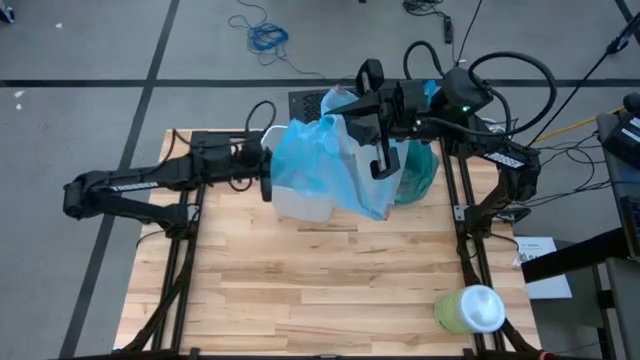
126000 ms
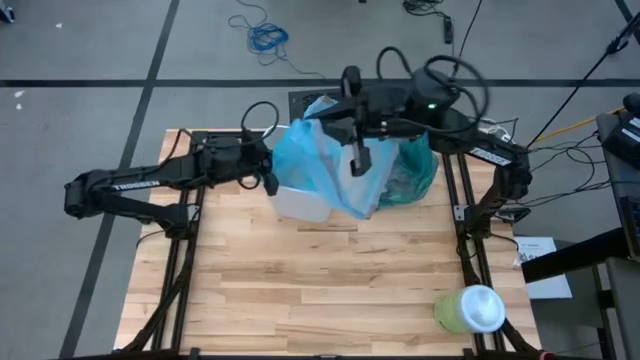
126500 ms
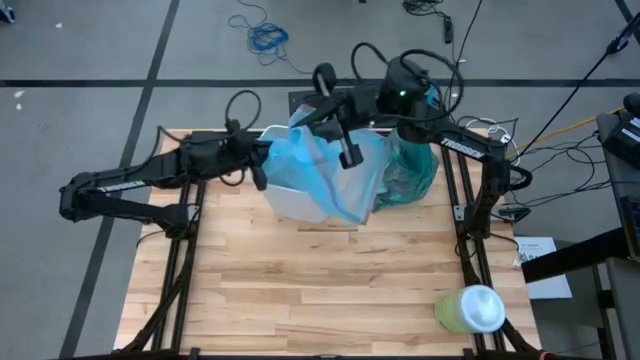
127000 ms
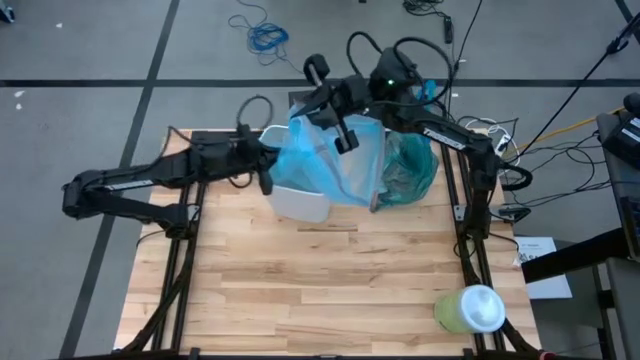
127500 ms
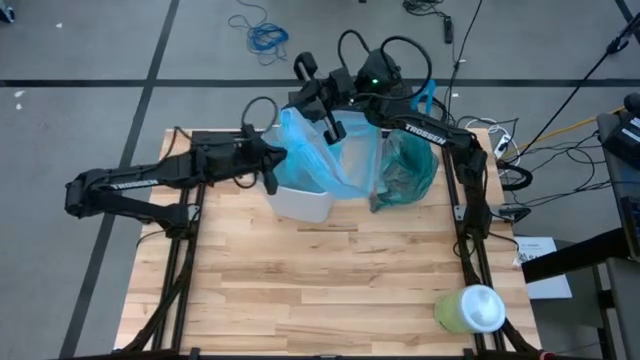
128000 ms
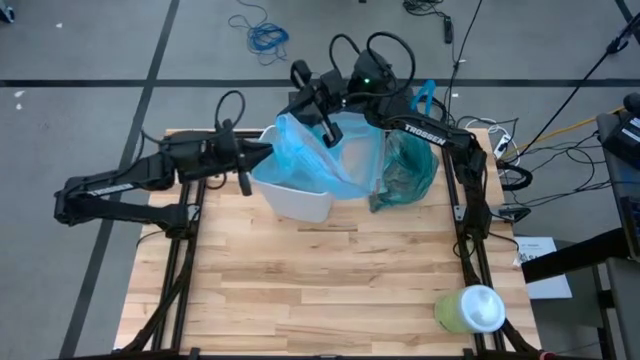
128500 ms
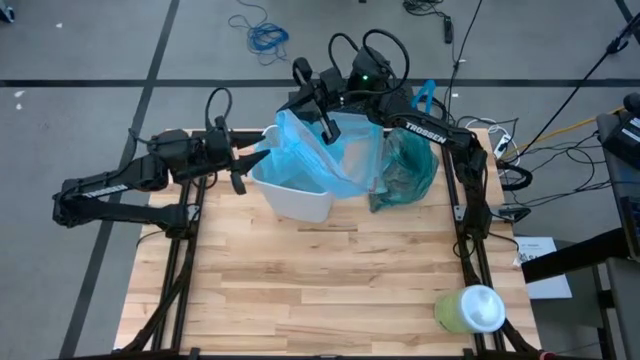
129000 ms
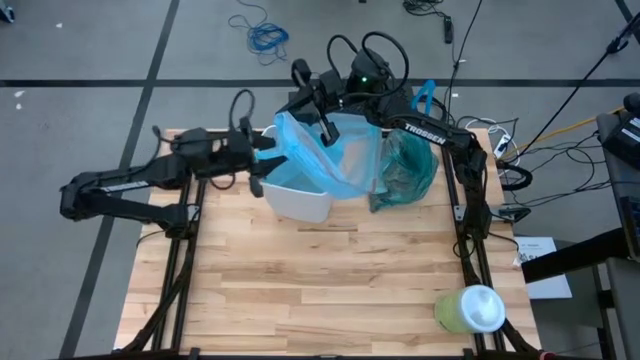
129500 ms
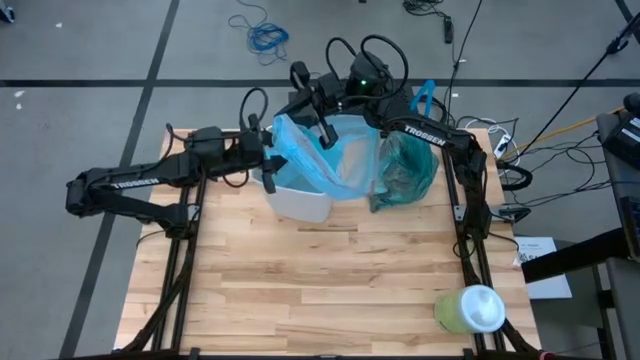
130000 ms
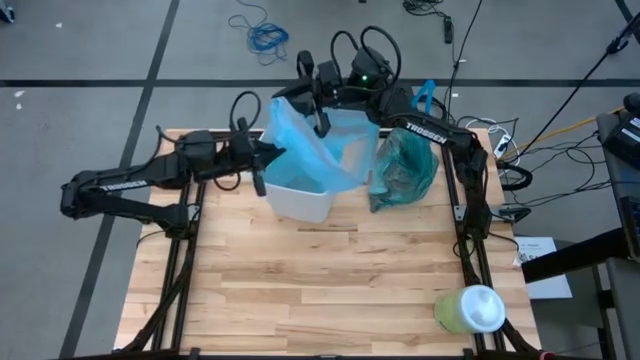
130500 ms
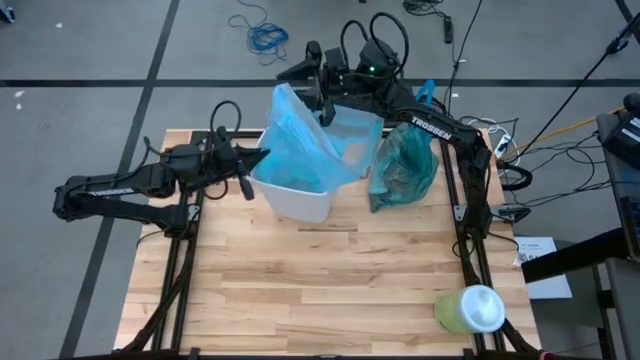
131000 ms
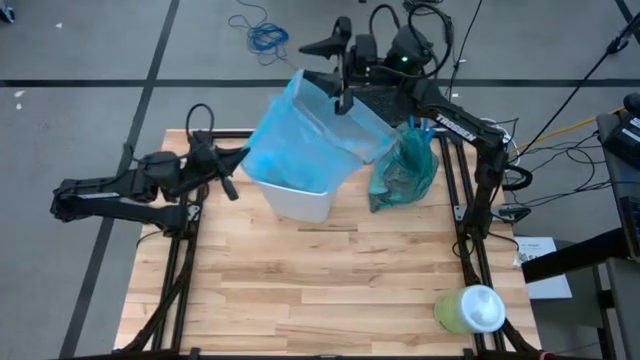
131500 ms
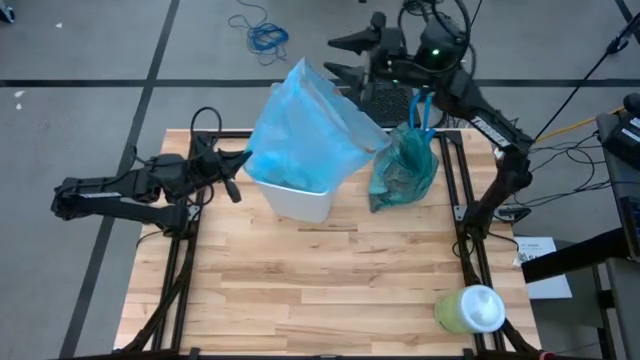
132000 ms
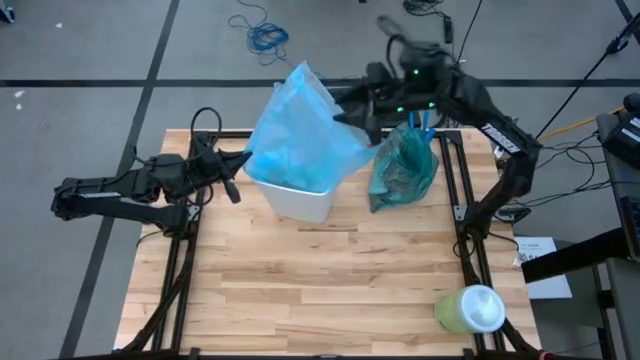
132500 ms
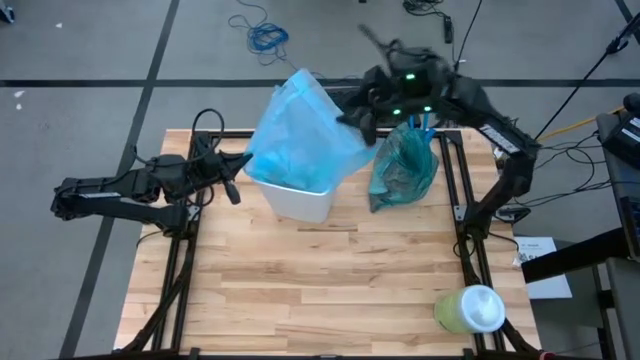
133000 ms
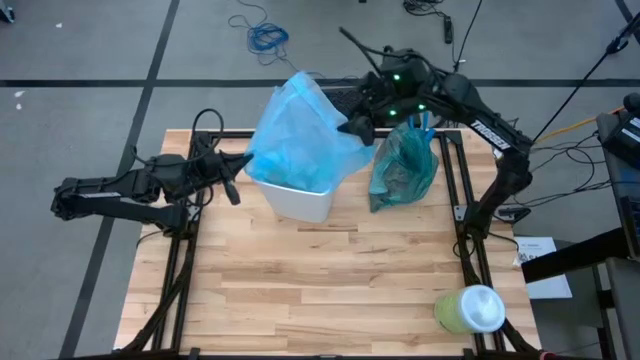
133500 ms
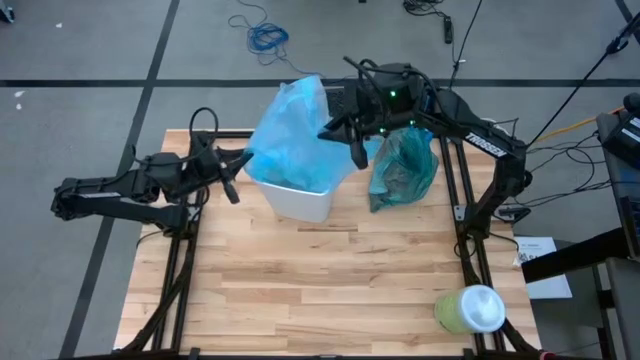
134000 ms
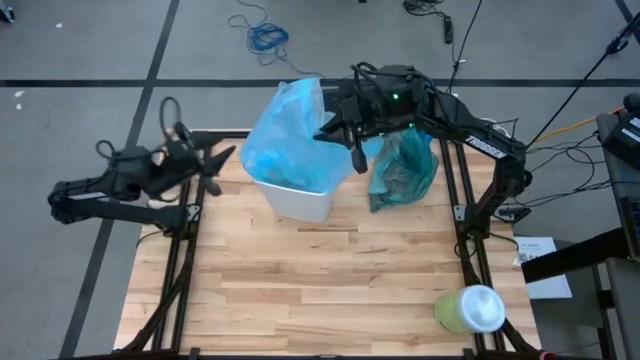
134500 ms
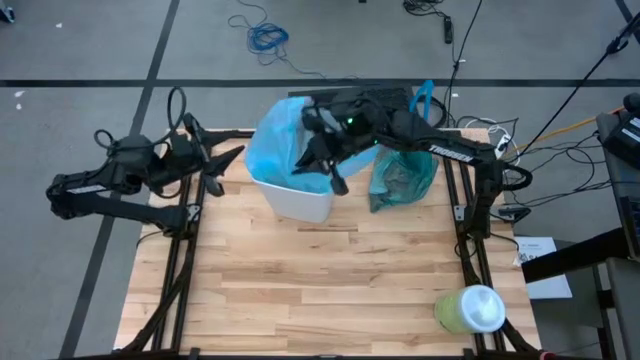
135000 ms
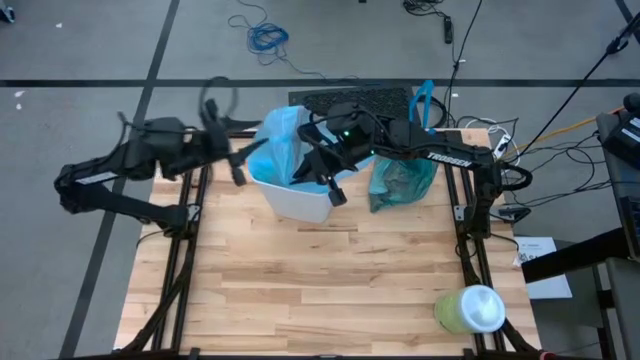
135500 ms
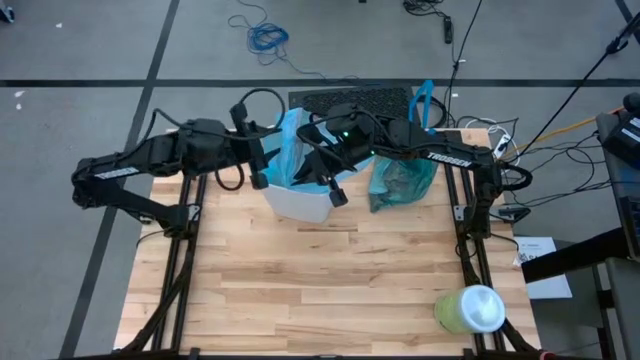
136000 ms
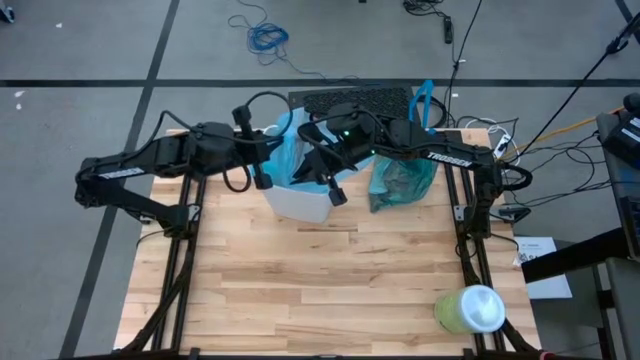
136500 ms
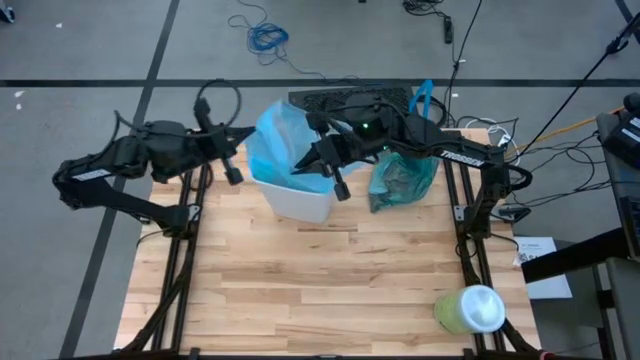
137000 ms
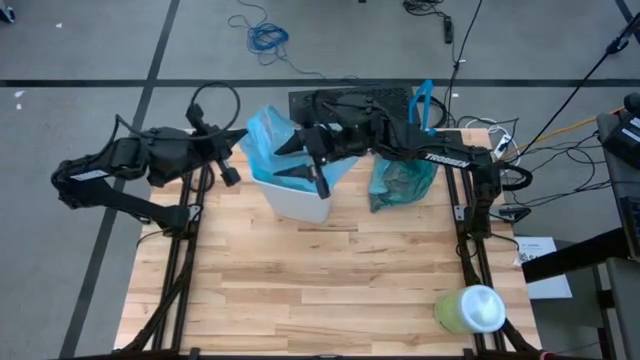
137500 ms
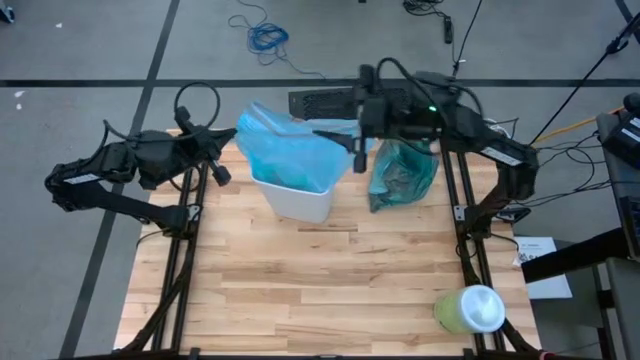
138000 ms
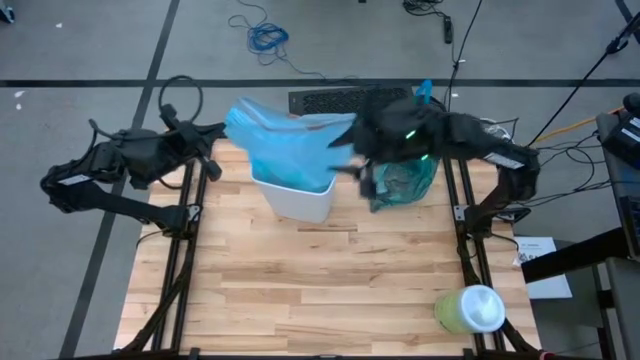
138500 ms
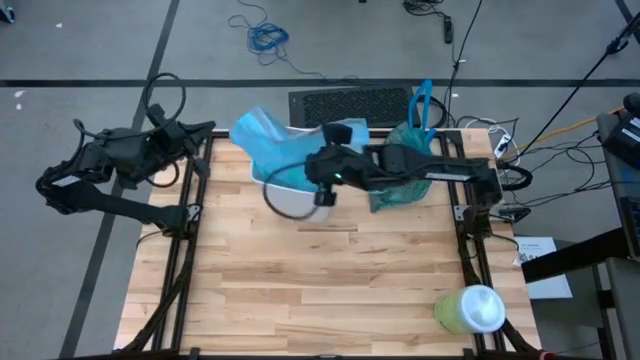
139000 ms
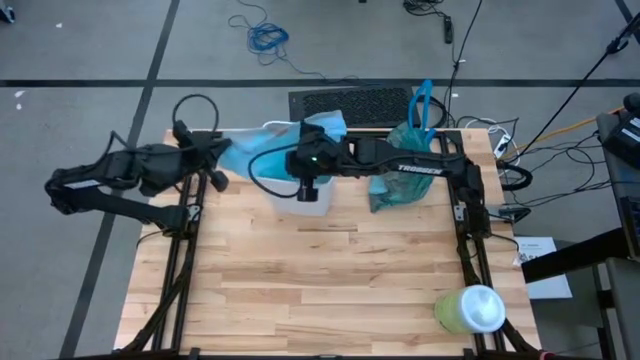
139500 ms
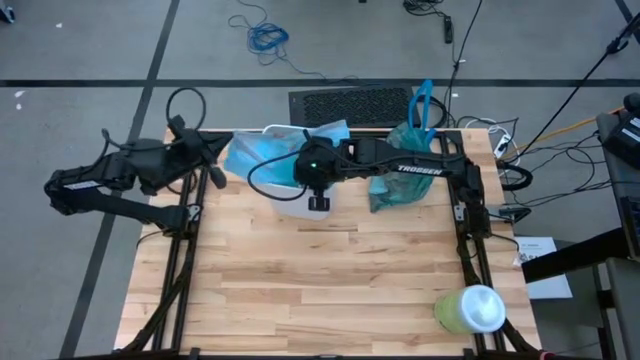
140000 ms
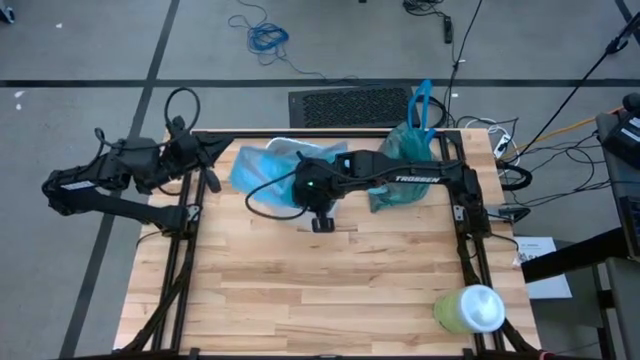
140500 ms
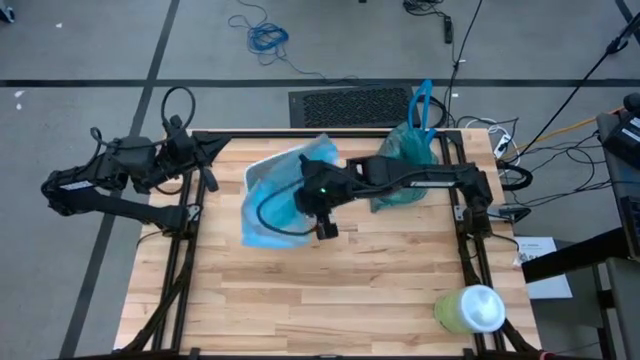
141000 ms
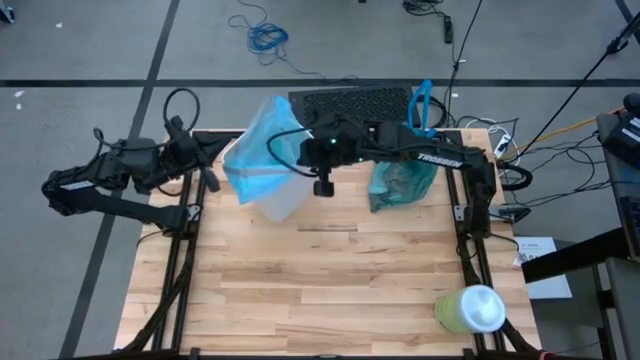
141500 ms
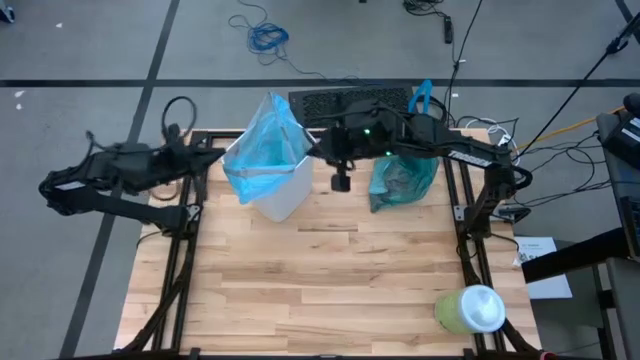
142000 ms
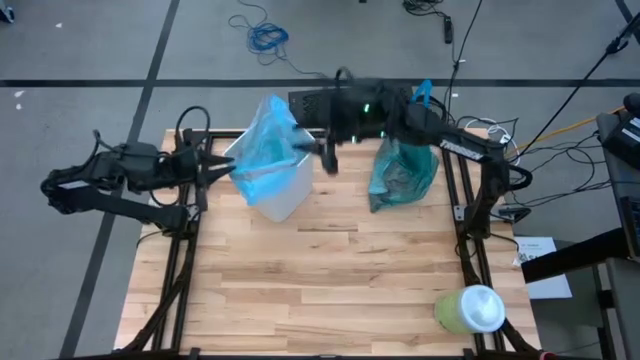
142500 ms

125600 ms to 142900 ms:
Task: place trash/remove bag and relplace
Insert a new trash bag into the trash bin

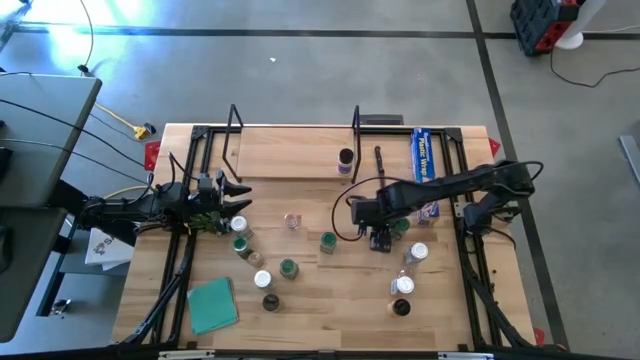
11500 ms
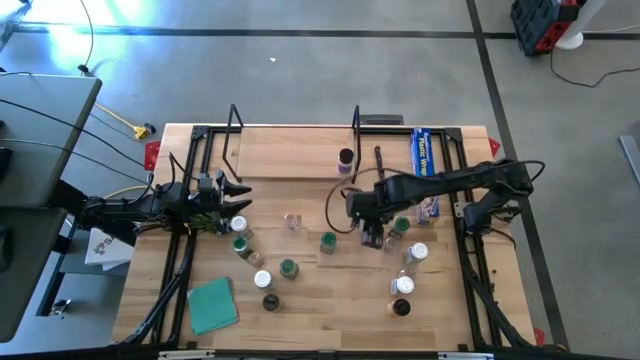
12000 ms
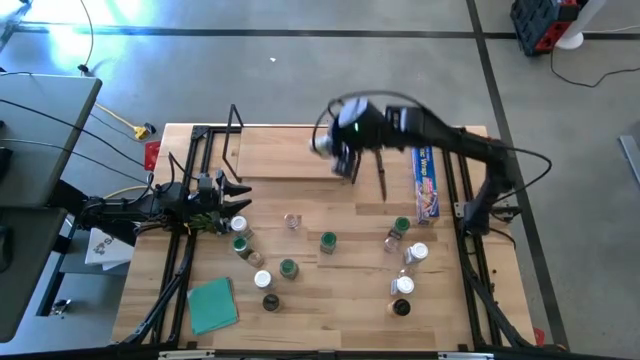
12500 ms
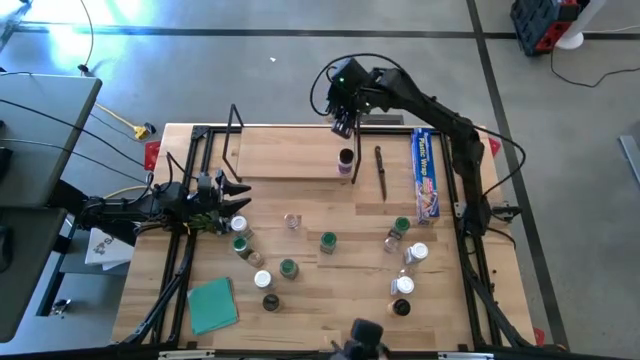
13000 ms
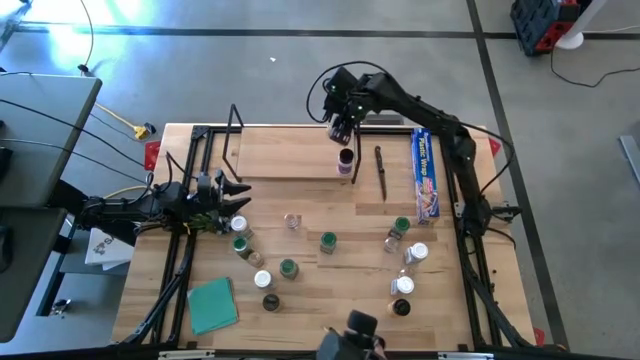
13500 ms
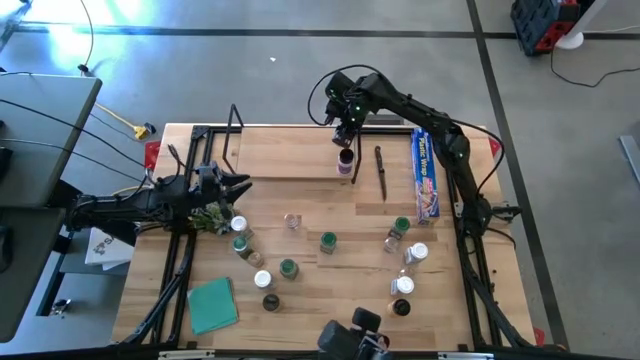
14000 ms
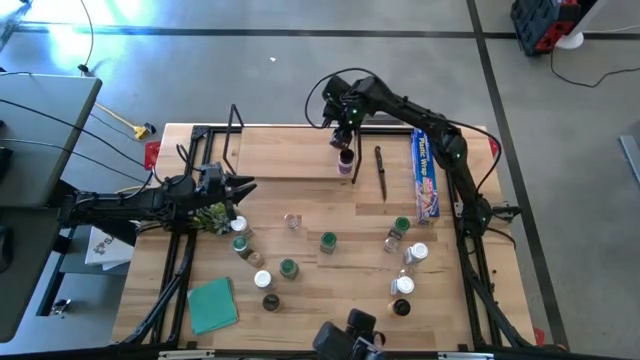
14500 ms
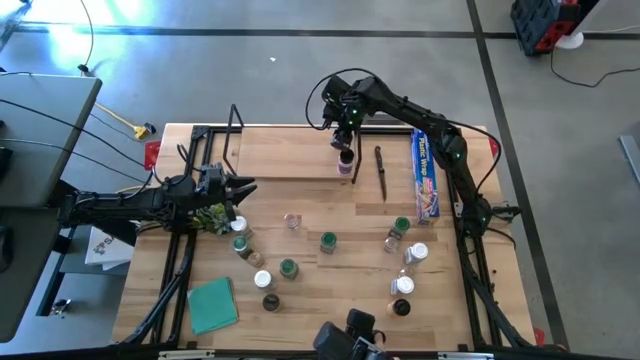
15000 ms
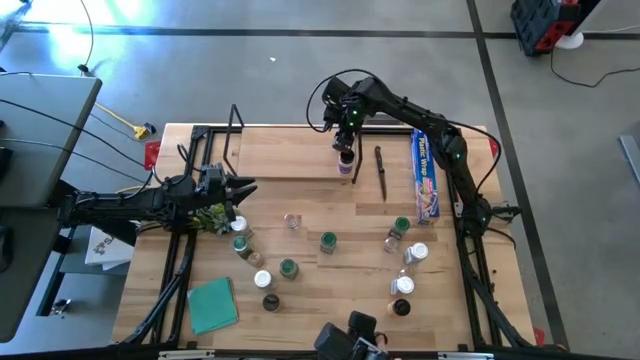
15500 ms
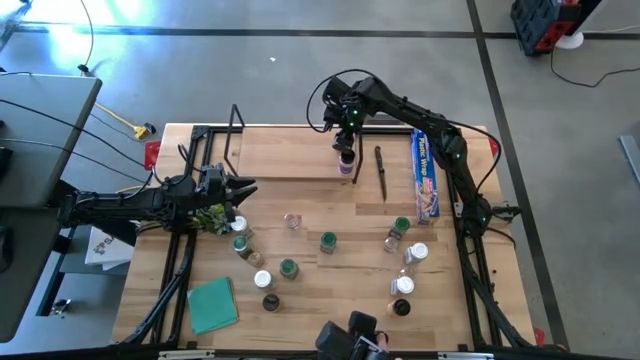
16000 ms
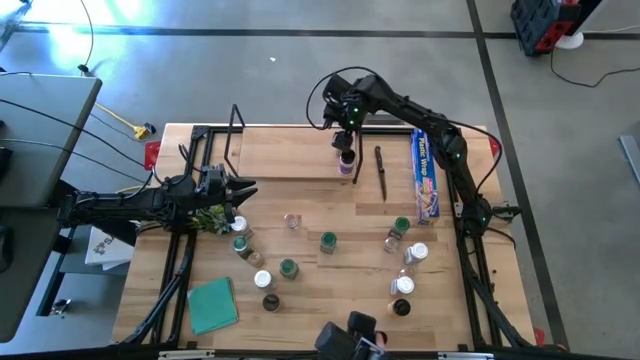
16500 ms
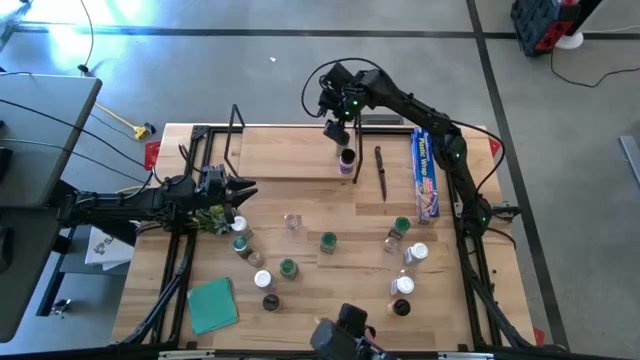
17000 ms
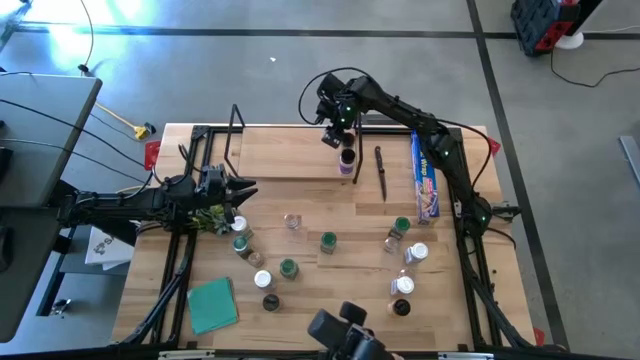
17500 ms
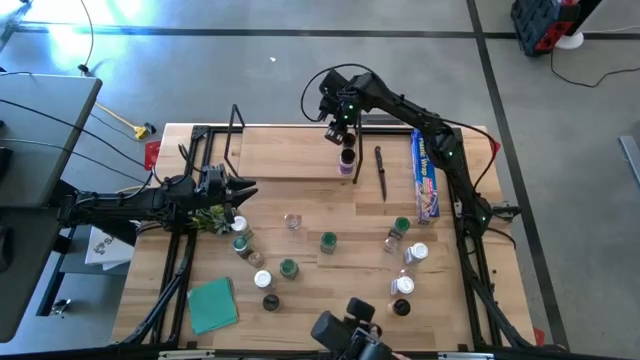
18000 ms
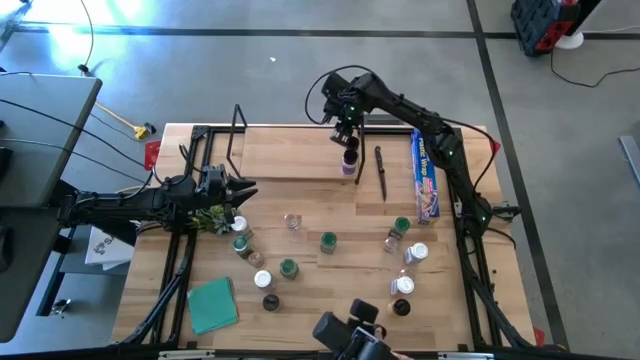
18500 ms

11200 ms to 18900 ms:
Task: Shelf spices
Put the black seasoning bottle on the shelf aligned with the other black seasoning bottle
